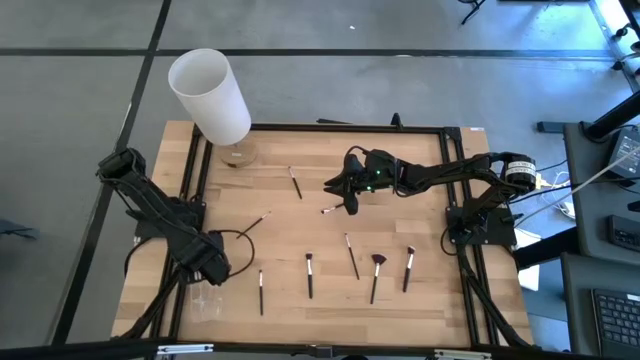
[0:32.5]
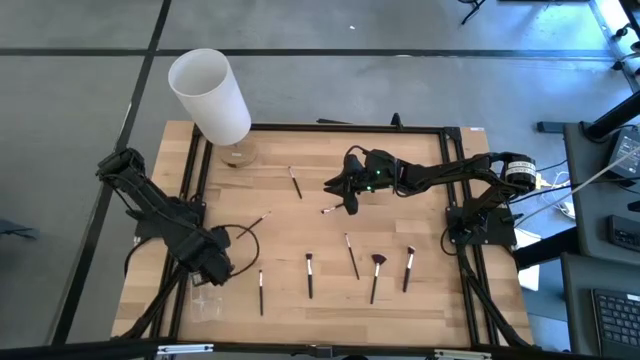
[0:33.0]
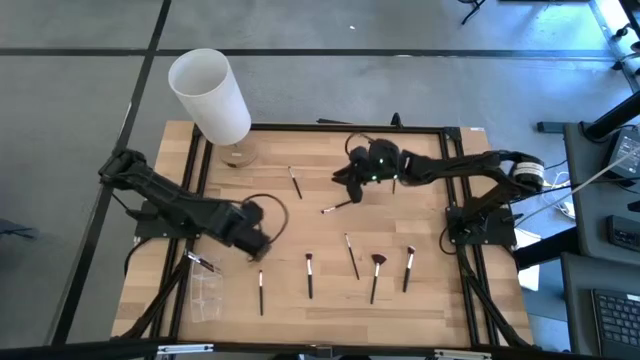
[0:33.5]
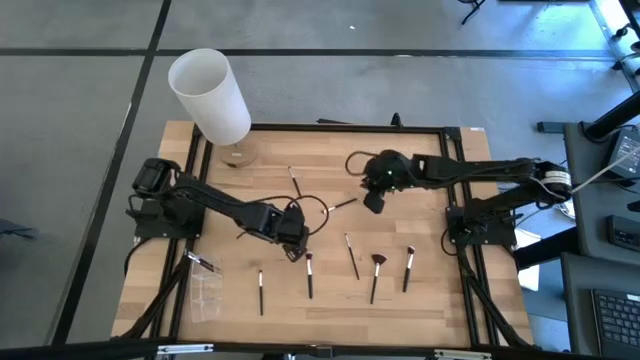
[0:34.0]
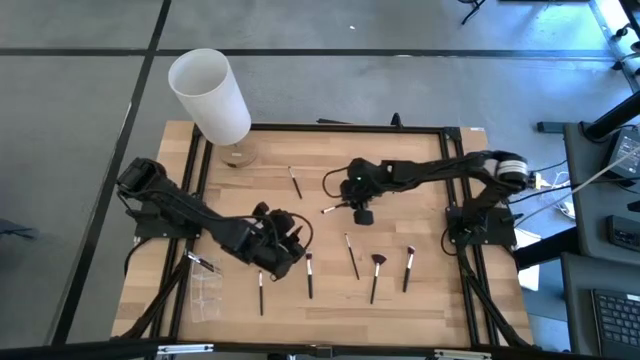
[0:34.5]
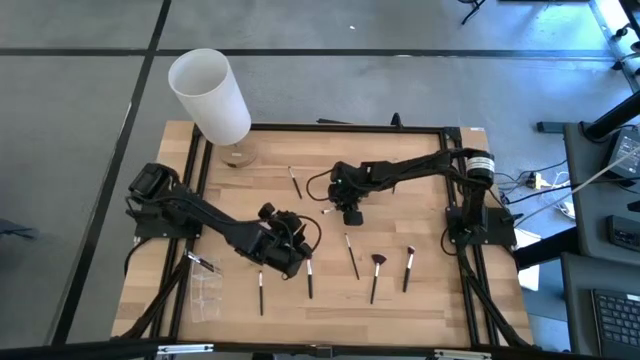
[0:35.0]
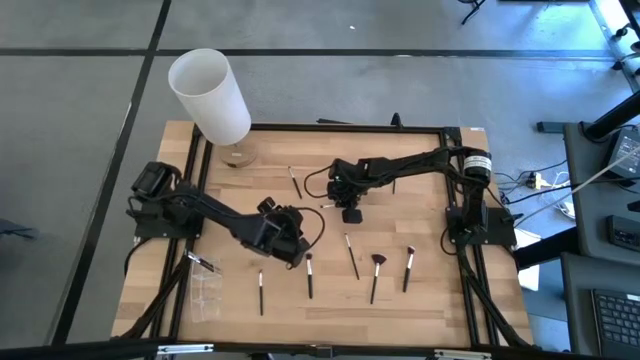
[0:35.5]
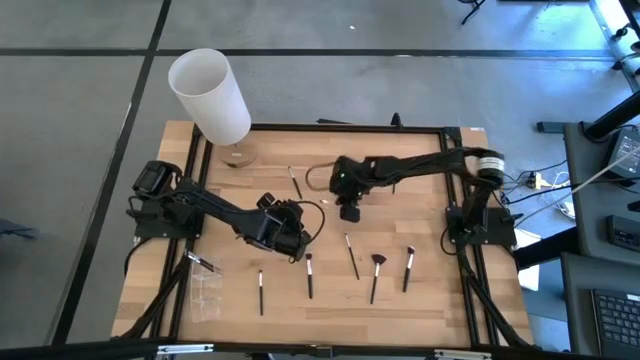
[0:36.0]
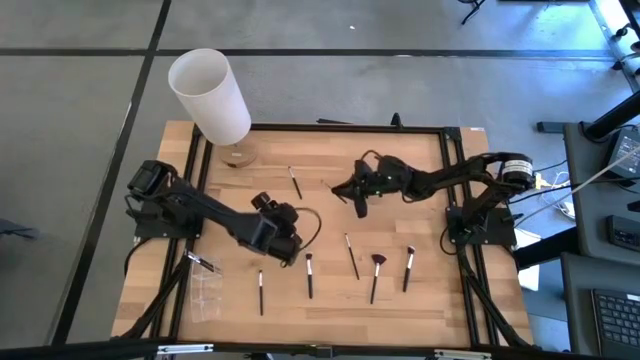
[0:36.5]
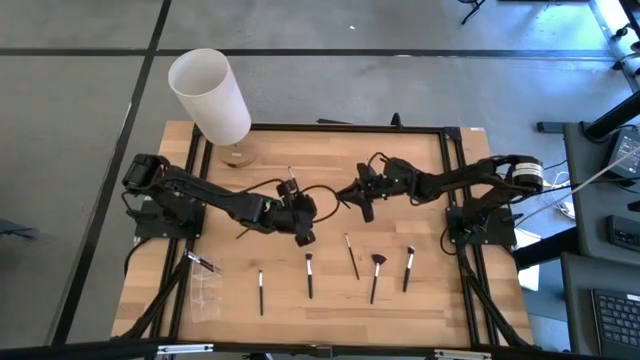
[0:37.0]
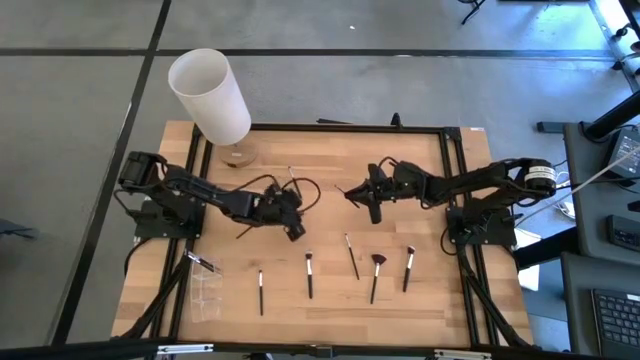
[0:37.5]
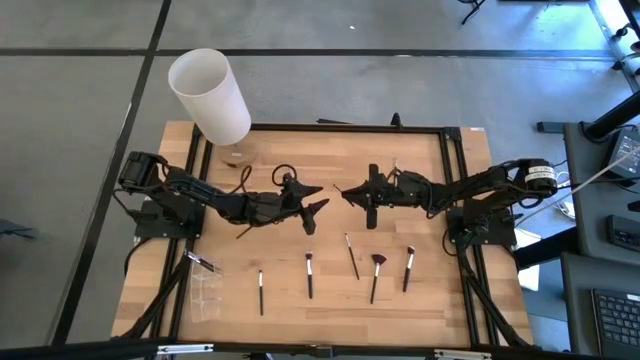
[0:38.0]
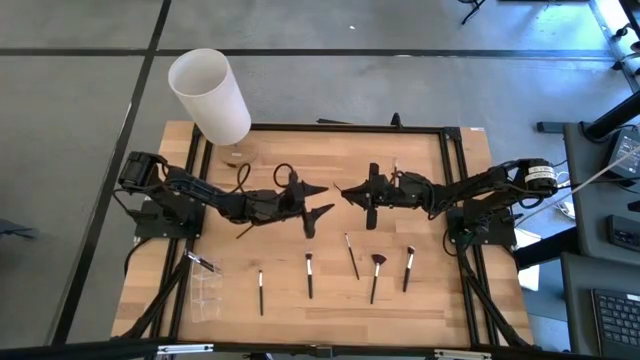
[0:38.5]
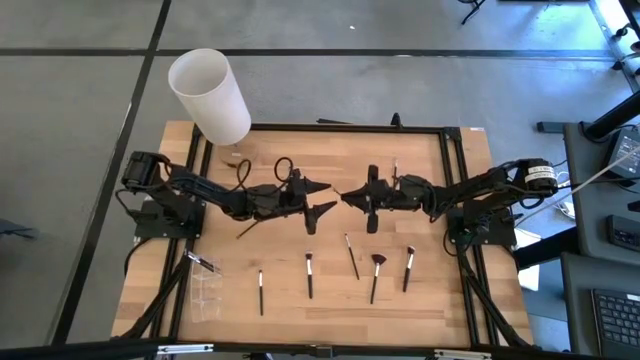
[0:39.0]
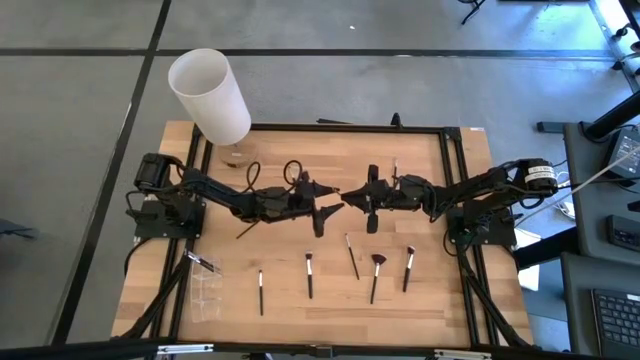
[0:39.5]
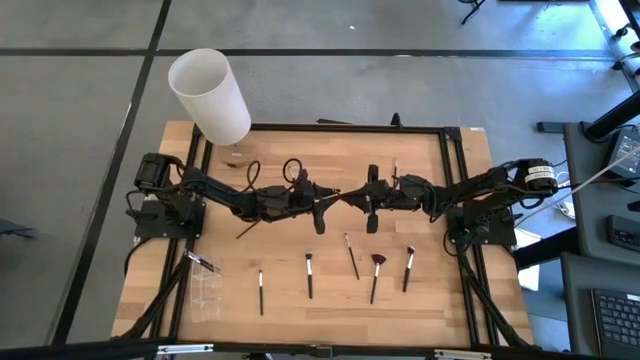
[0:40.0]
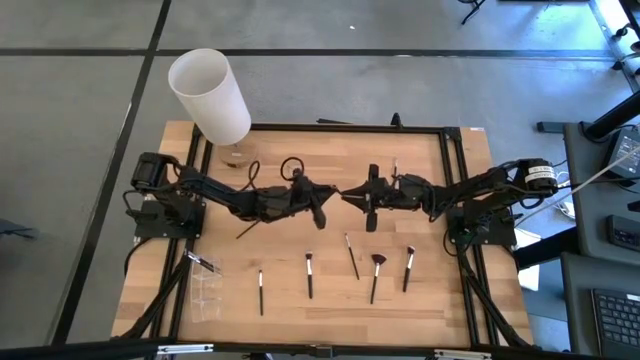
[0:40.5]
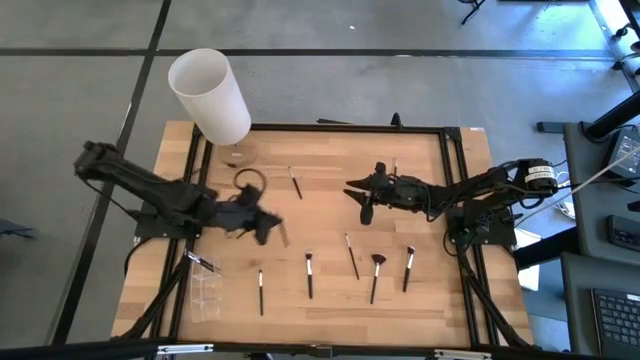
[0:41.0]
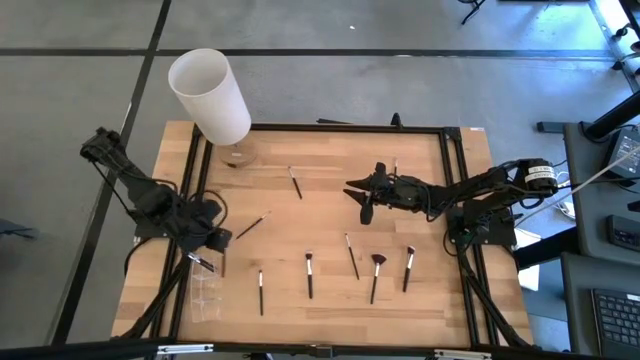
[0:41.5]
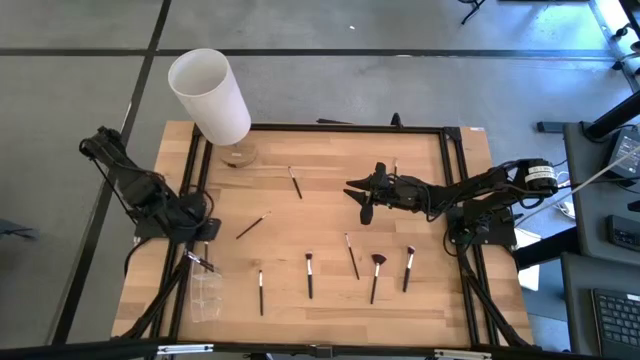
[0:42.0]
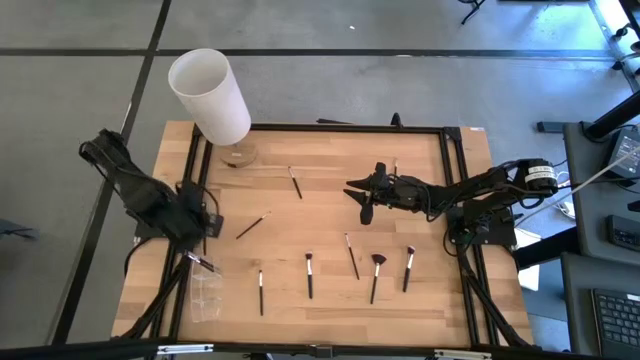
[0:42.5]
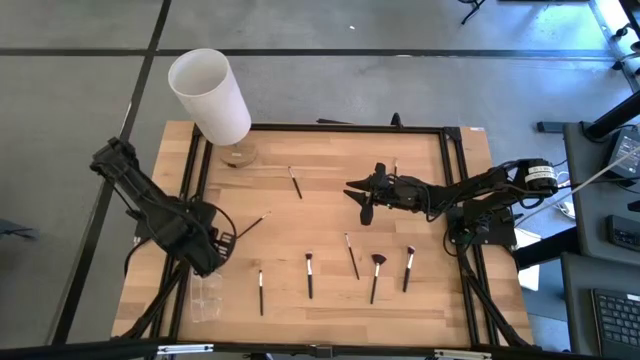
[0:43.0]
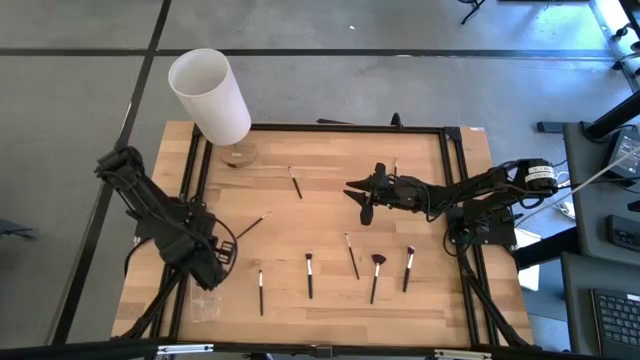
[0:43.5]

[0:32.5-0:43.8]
Task: Put items in baskets/containers
Put the eyeshadow brush into the transparent organizer

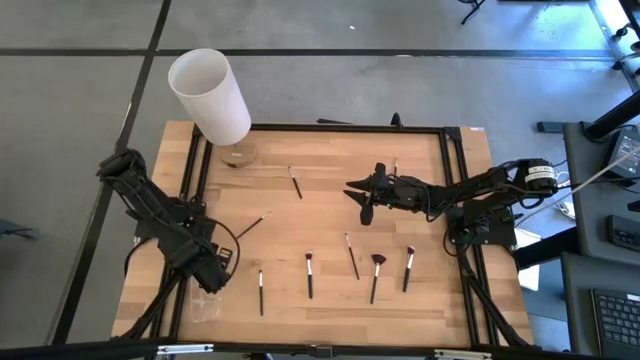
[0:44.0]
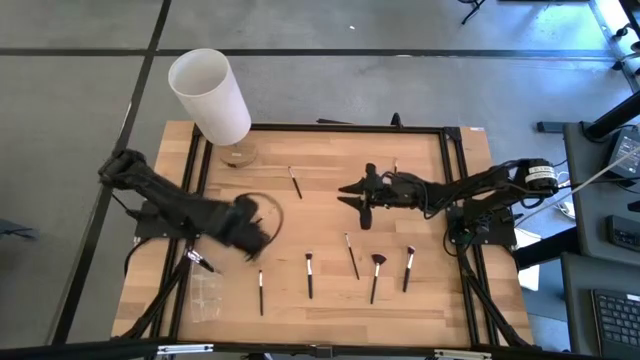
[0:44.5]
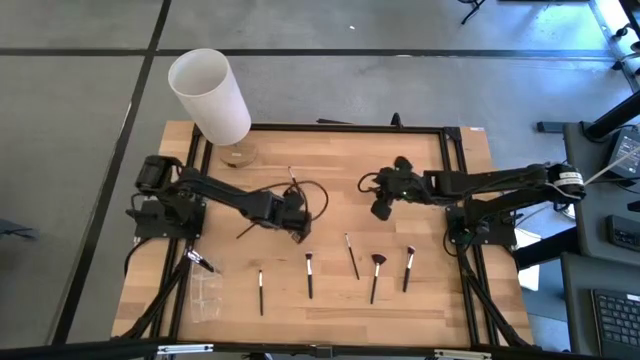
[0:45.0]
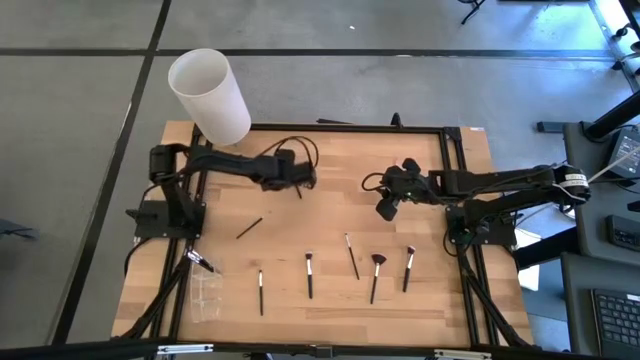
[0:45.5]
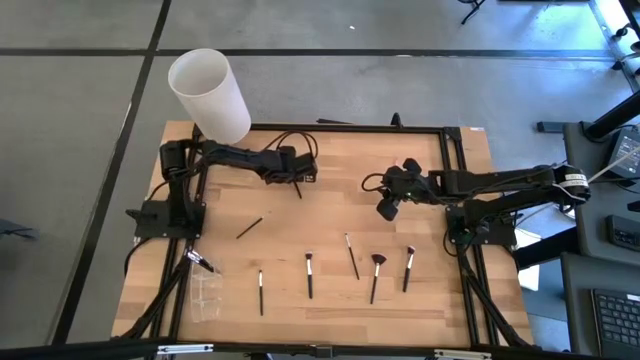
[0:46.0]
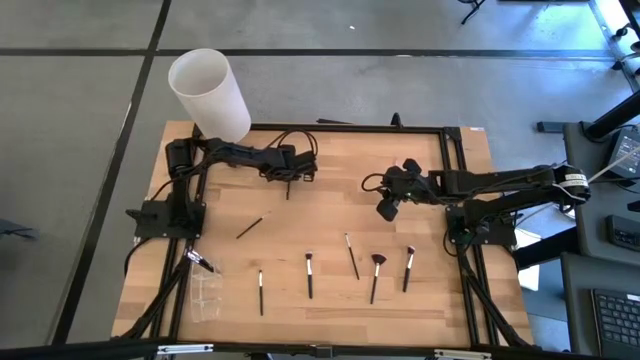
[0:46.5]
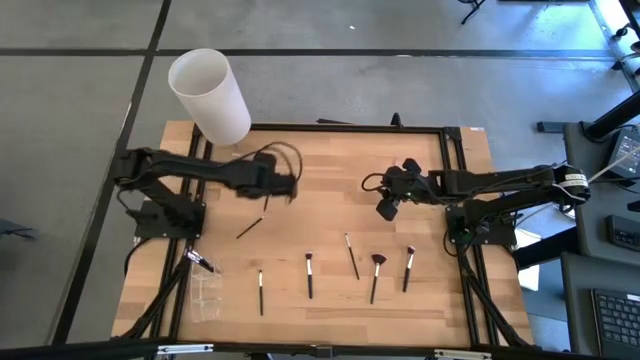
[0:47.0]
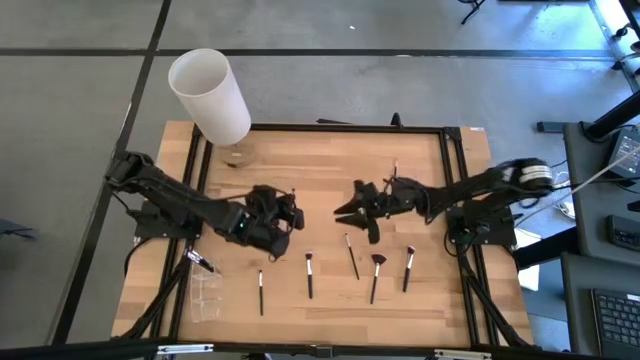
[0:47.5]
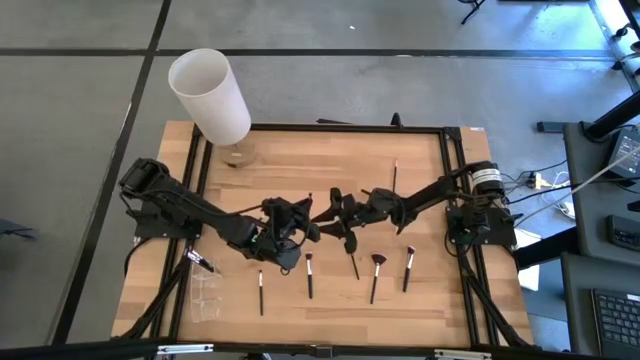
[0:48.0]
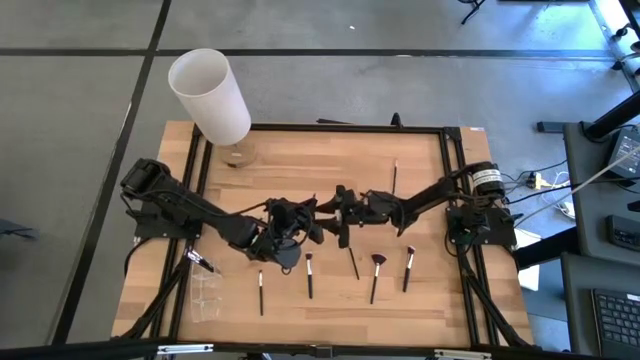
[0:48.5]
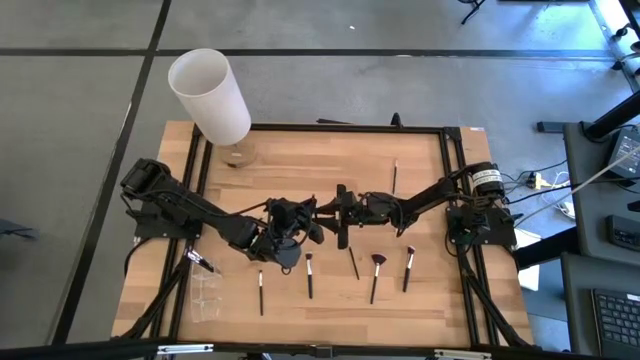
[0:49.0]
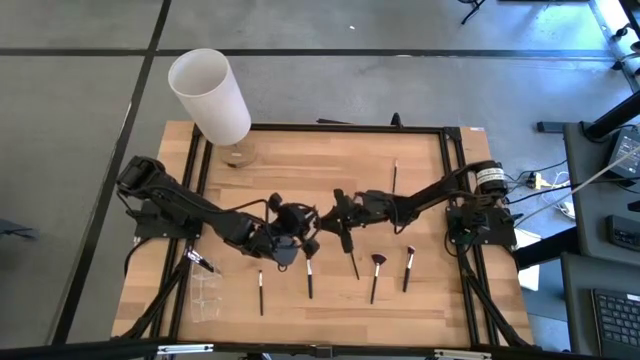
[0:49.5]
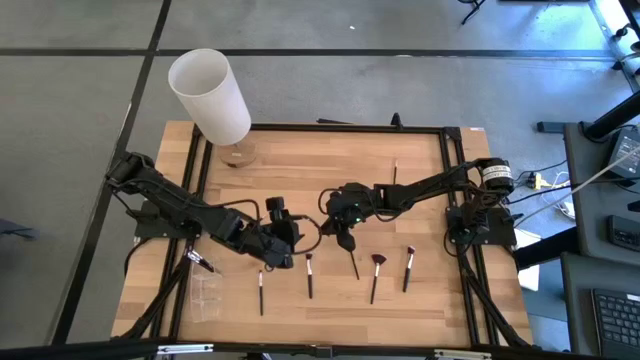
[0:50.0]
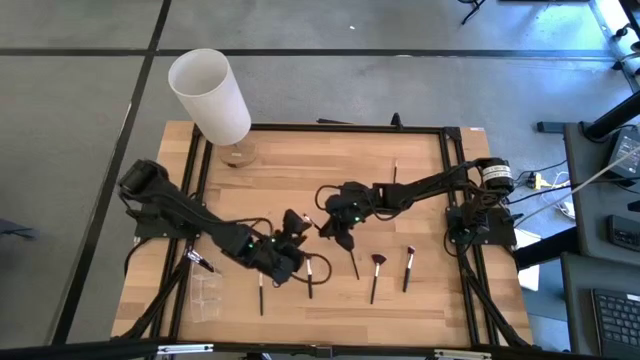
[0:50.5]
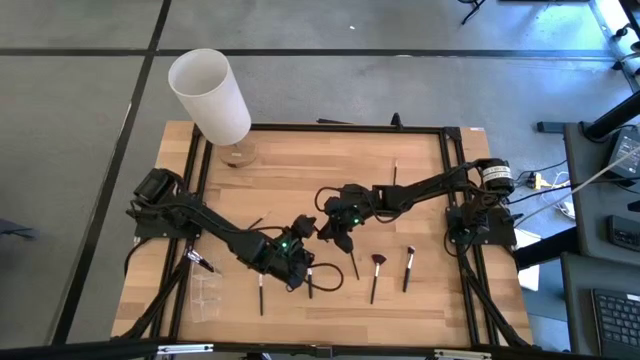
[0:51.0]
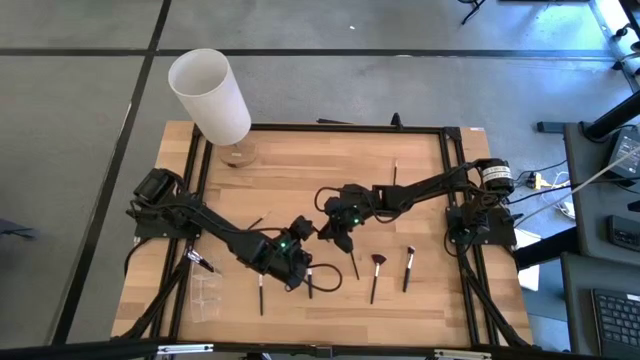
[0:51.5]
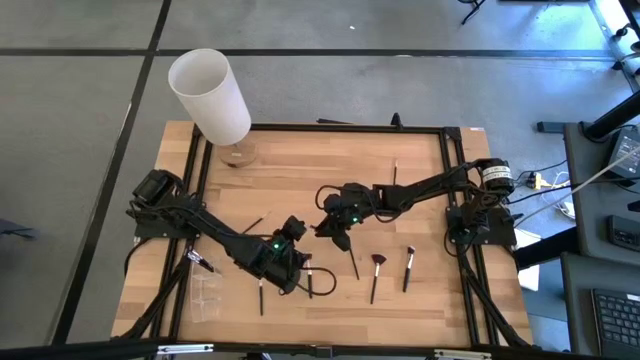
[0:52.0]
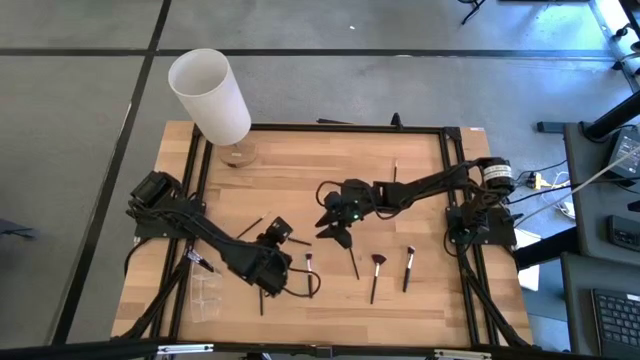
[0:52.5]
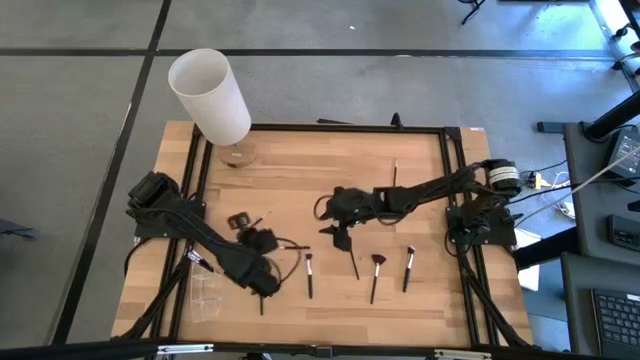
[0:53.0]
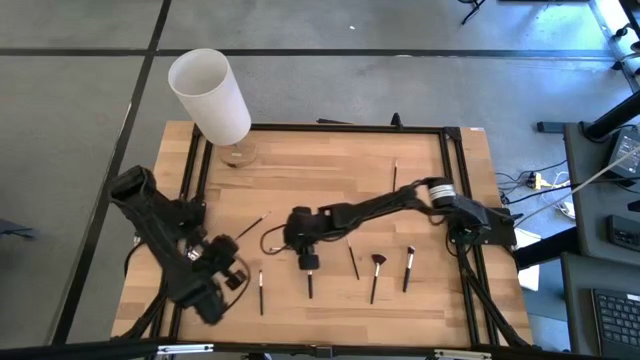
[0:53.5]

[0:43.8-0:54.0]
Put the eyeshadow brush into the transparent organizer

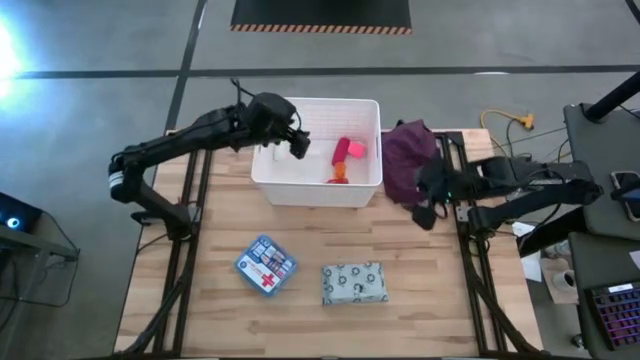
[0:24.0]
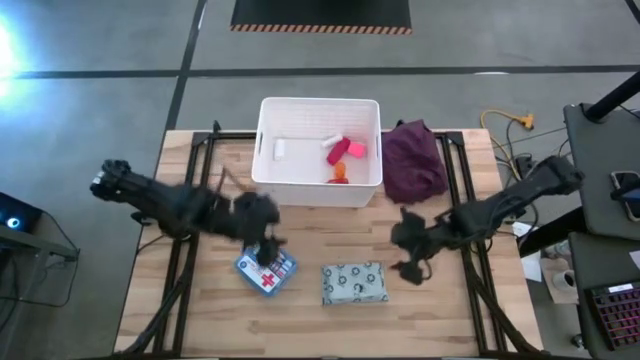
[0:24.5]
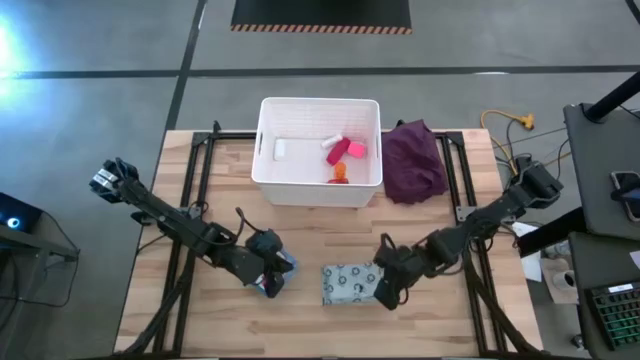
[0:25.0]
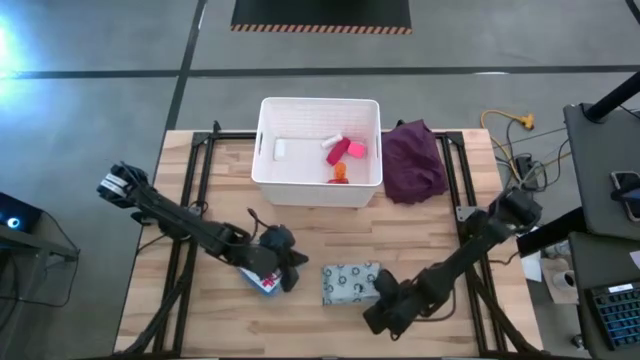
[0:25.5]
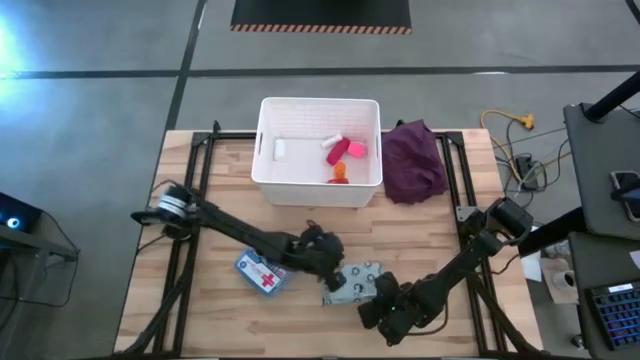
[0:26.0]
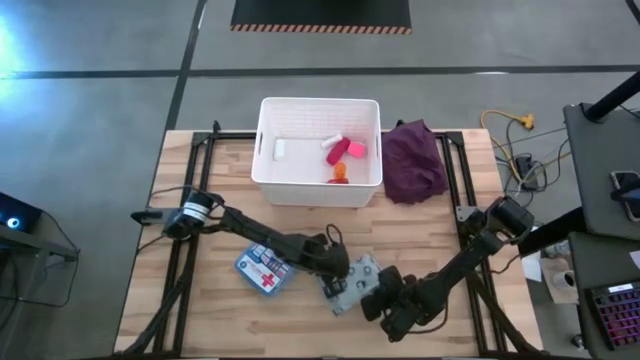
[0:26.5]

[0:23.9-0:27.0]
Task: Pick & place medical supplies in basket/bin
Put the medical supply bag into the white bin
